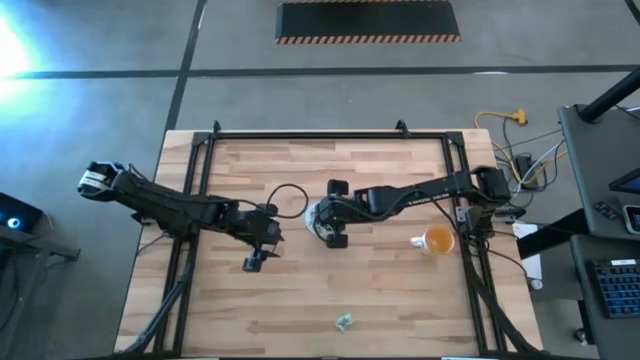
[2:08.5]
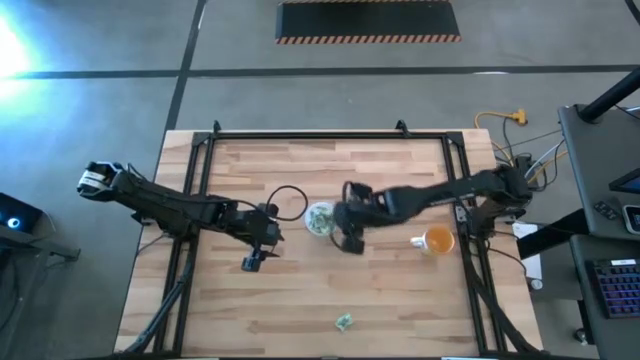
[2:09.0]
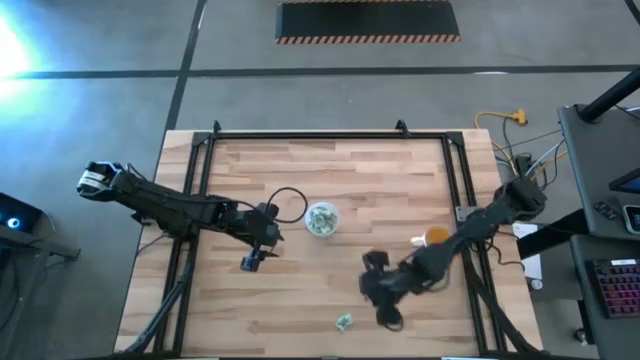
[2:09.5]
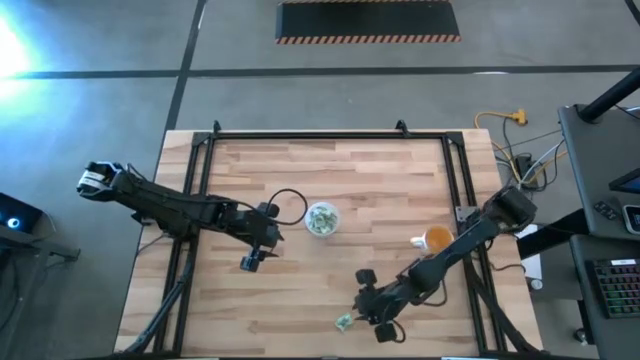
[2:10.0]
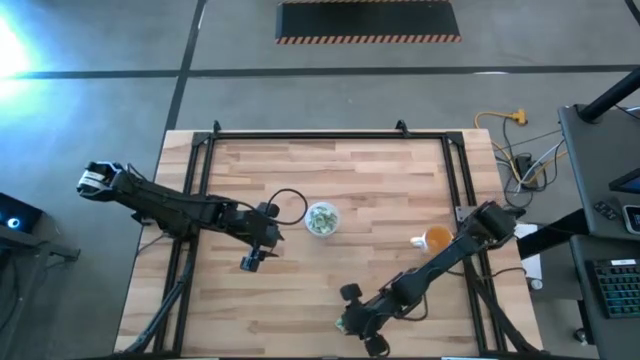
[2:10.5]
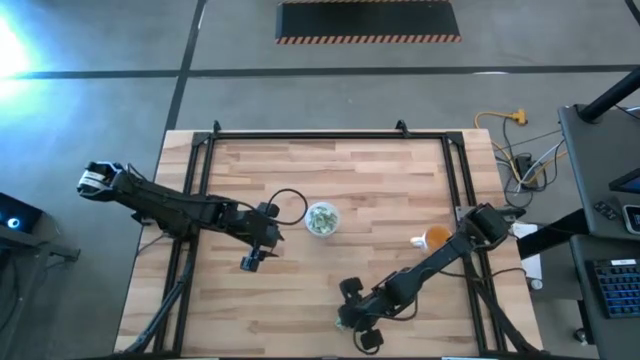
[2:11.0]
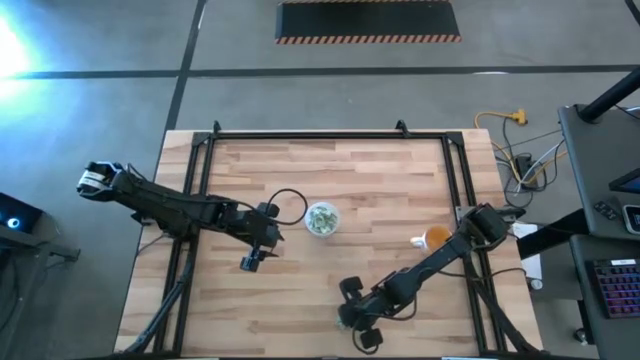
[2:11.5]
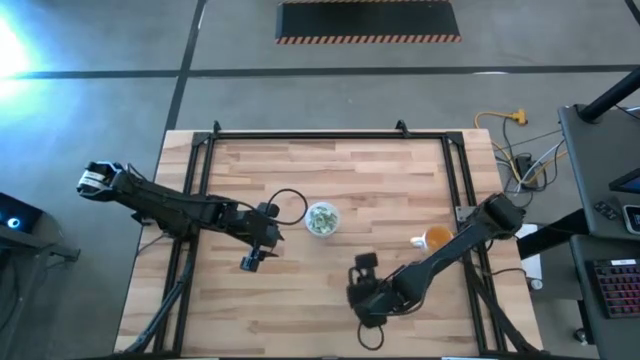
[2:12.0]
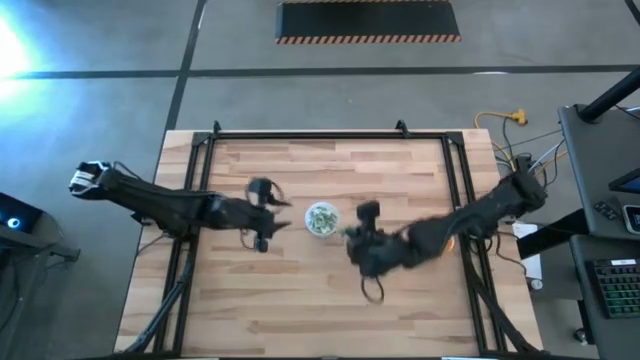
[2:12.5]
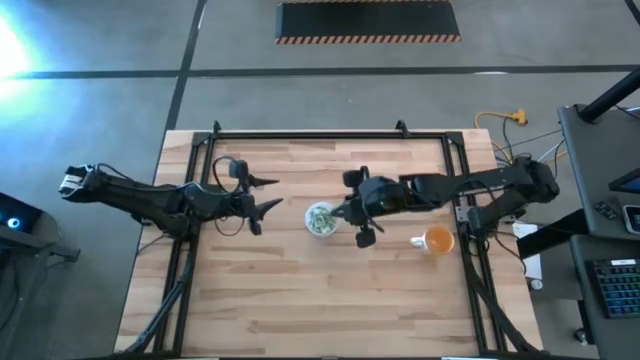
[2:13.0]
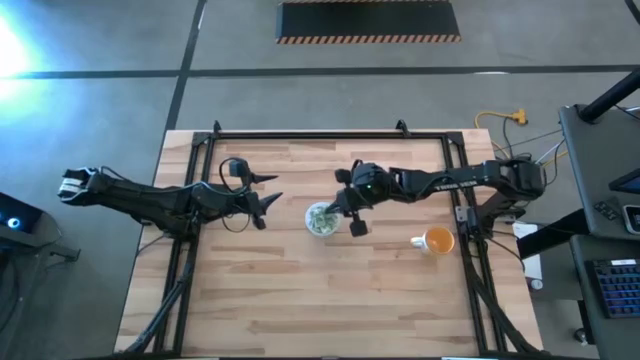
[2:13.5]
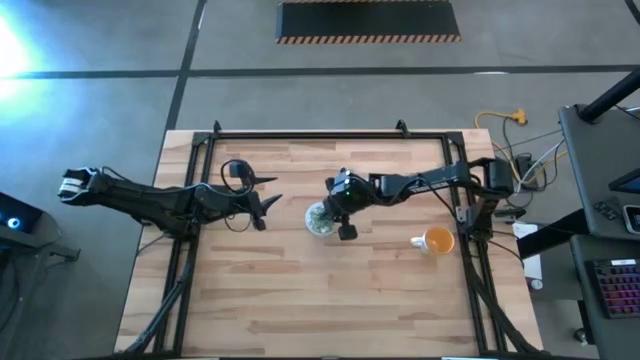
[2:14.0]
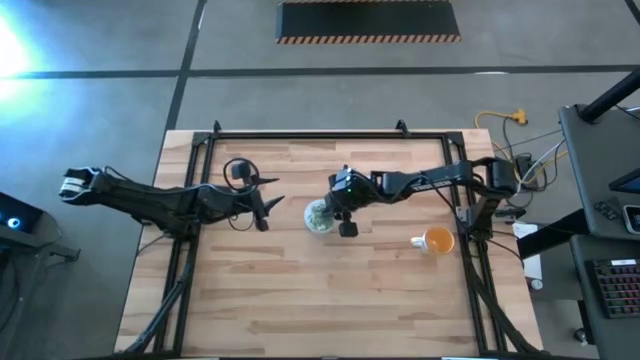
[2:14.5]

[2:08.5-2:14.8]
Task: Pick and place Stevia / Truvia into bins
Put the light green stevia packet into the transparent container

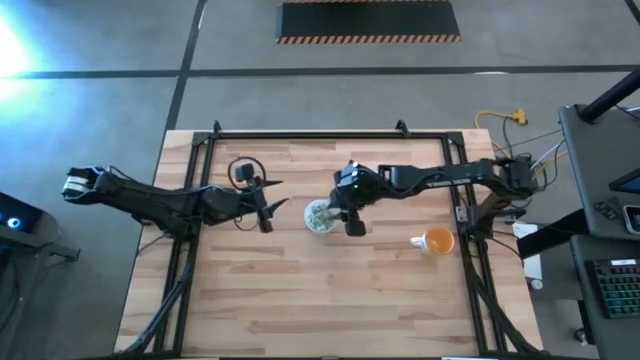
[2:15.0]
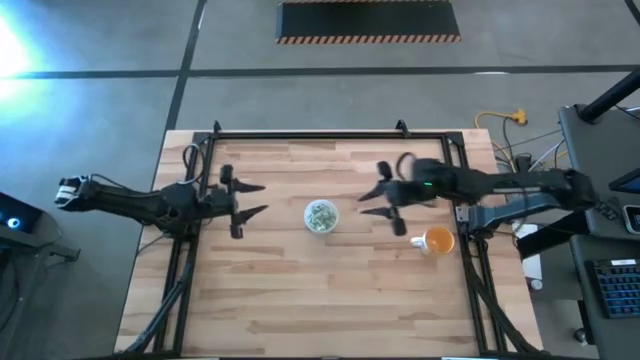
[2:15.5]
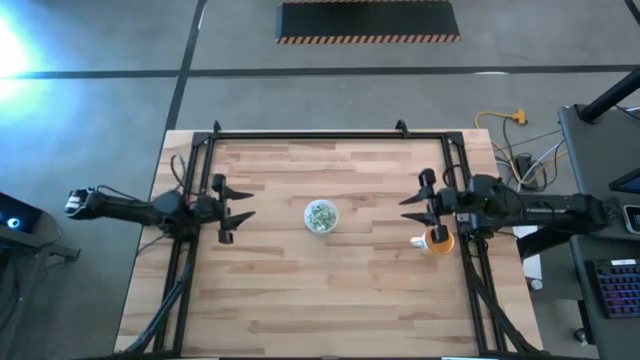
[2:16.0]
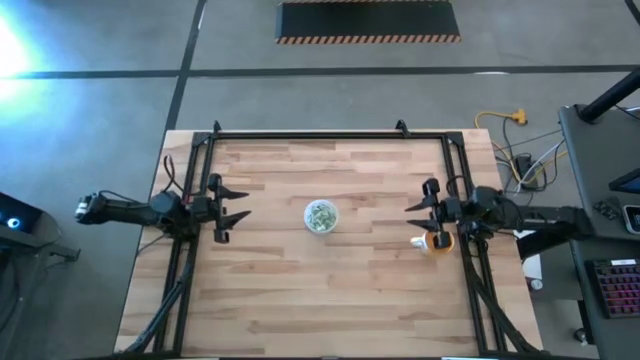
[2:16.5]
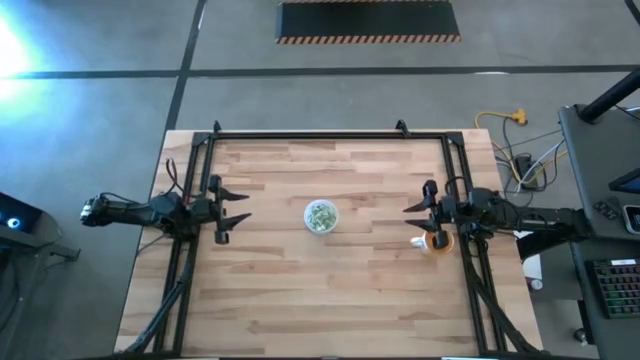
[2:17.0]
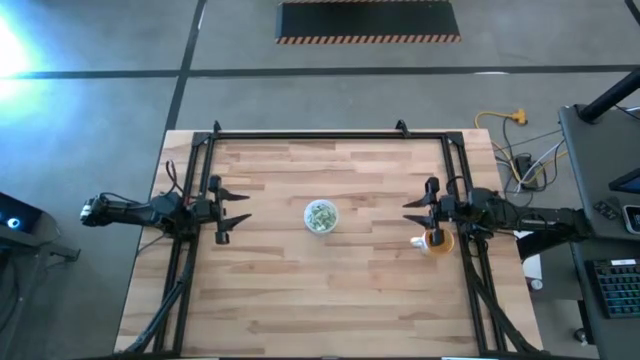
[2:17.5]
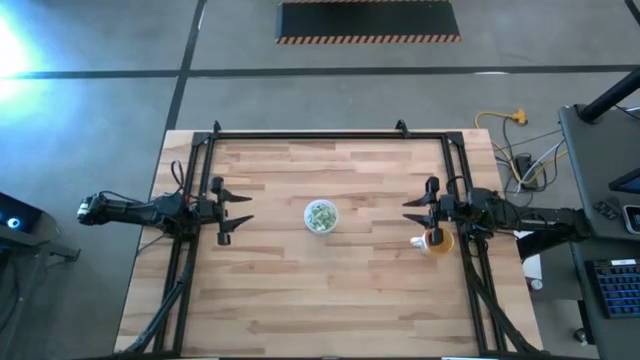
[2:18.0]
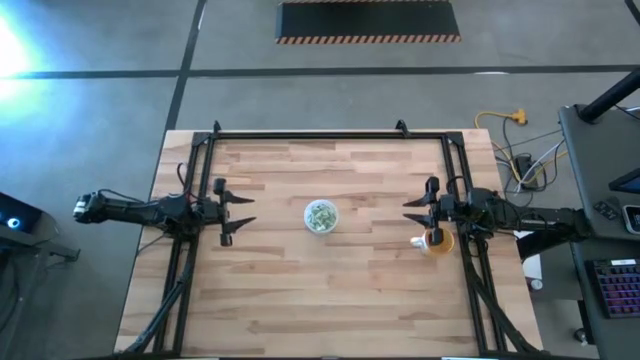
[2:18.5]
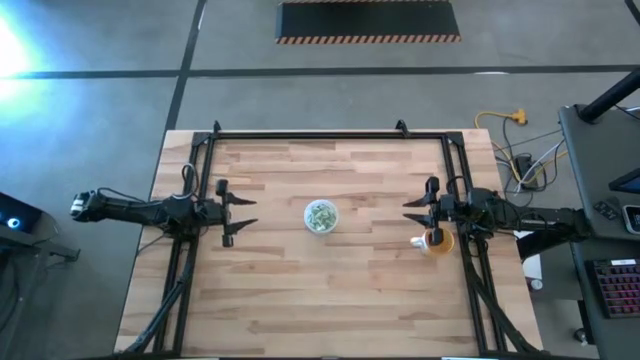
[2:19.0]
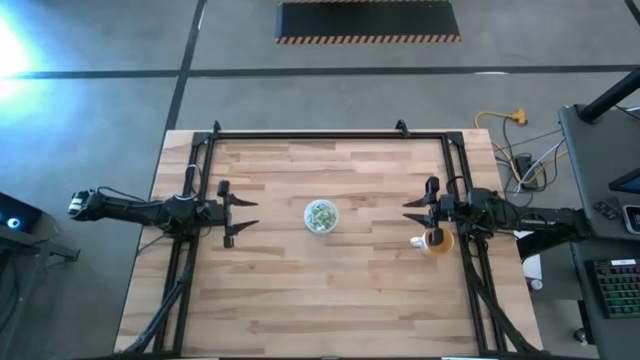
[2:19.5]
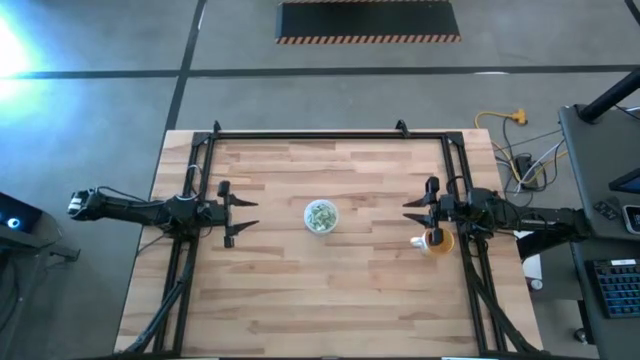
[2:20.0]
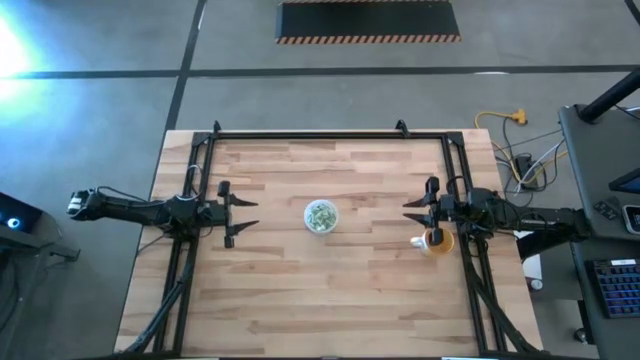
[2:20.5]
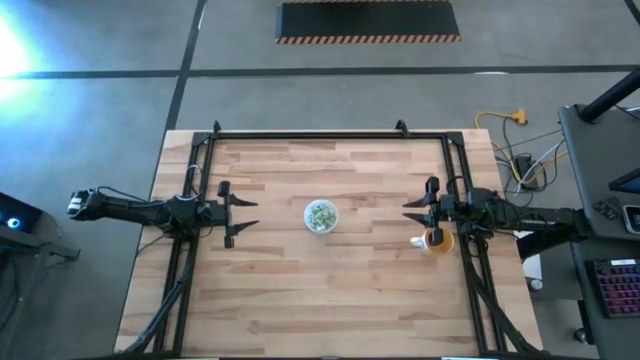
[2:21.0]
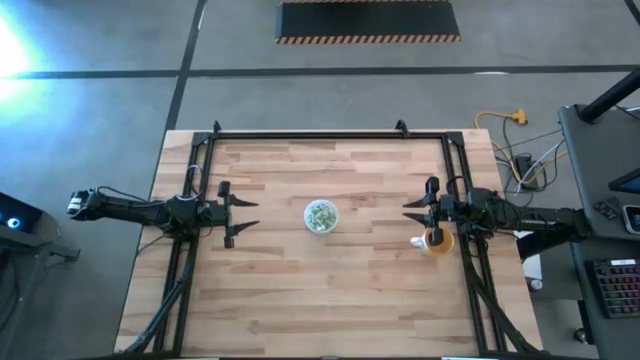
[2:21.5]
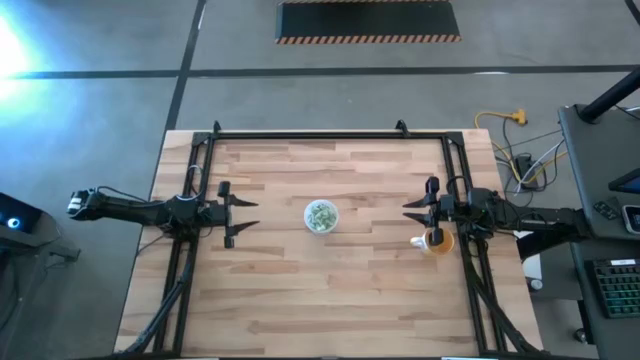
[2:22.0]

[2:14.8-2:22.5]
Return to Home Position

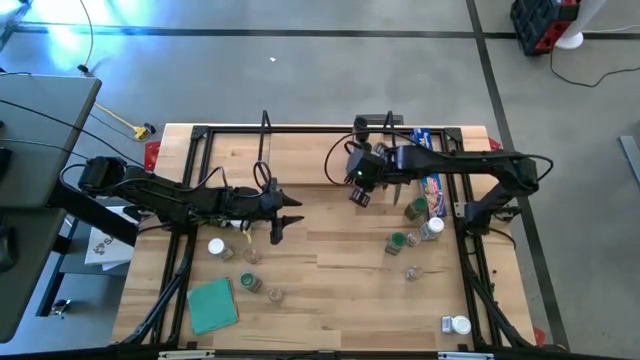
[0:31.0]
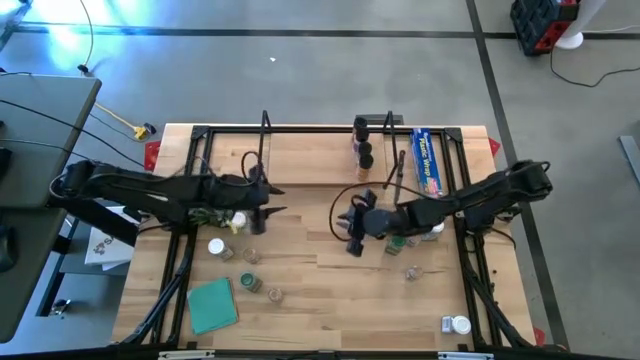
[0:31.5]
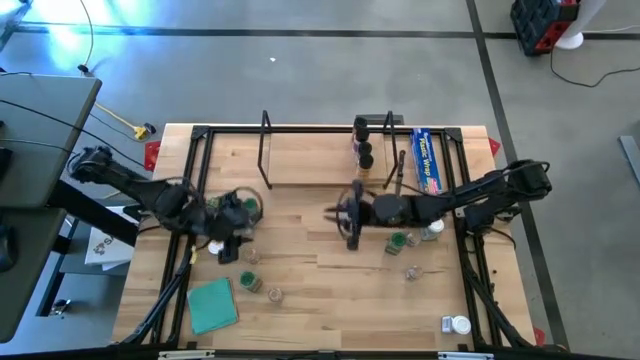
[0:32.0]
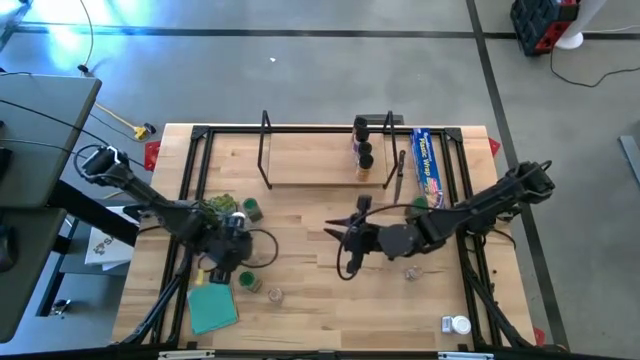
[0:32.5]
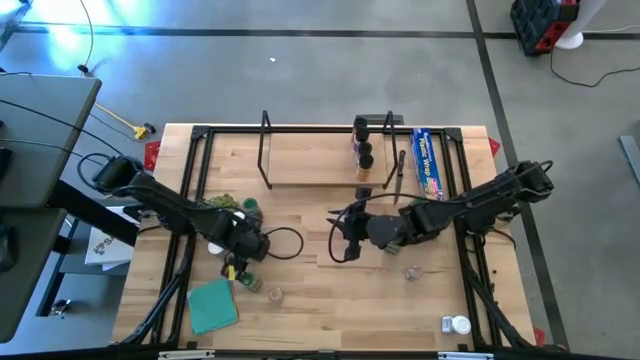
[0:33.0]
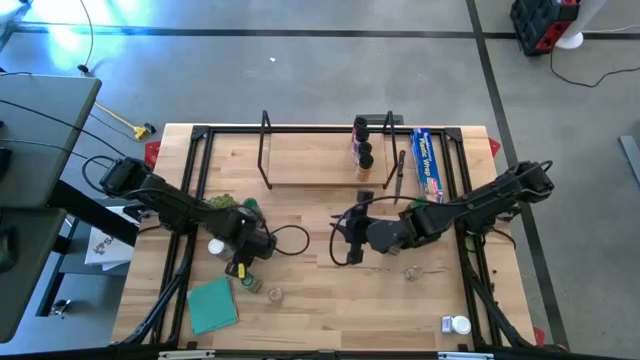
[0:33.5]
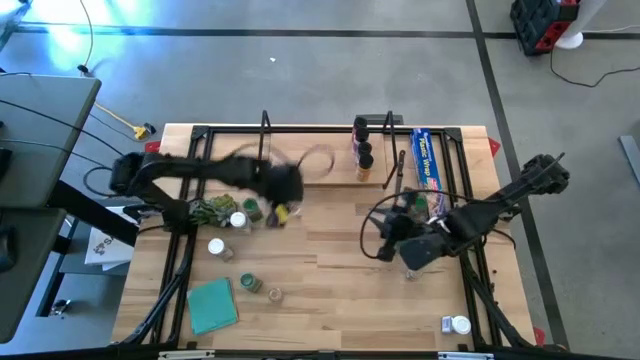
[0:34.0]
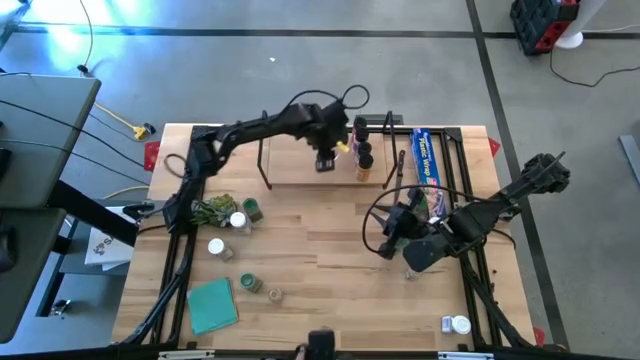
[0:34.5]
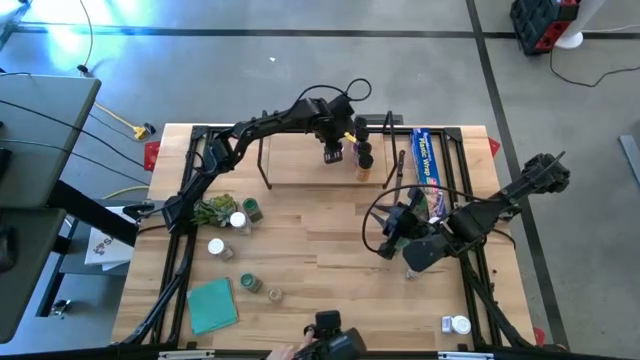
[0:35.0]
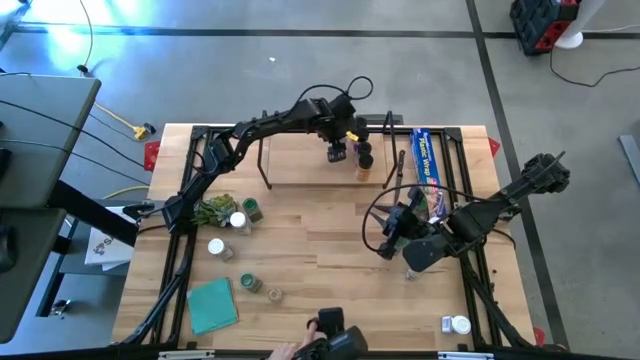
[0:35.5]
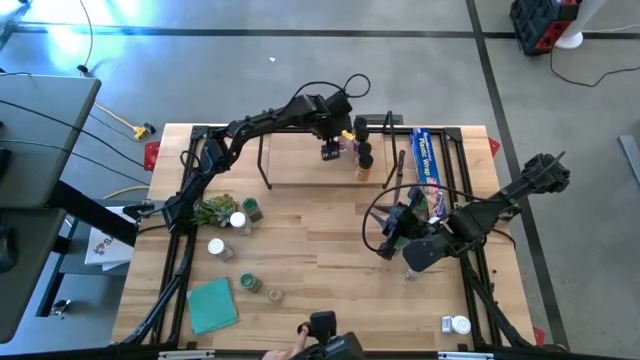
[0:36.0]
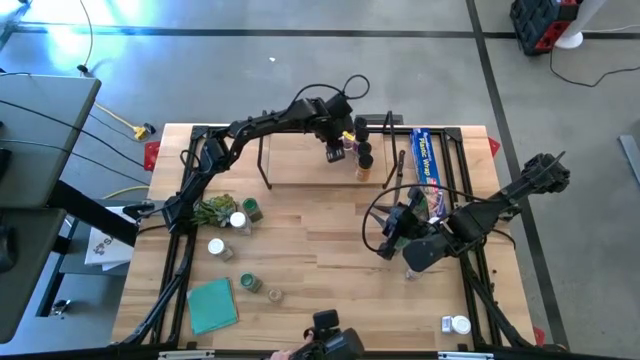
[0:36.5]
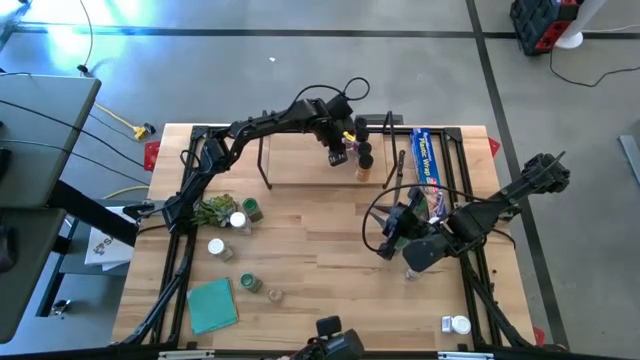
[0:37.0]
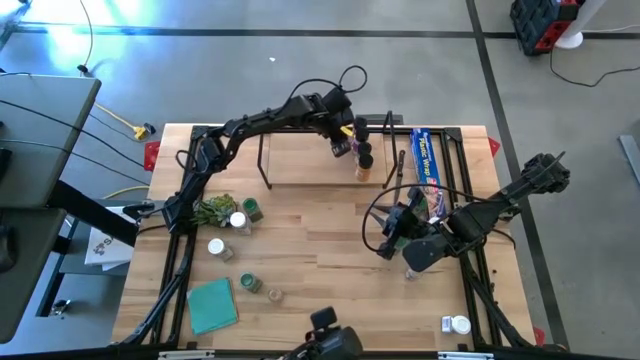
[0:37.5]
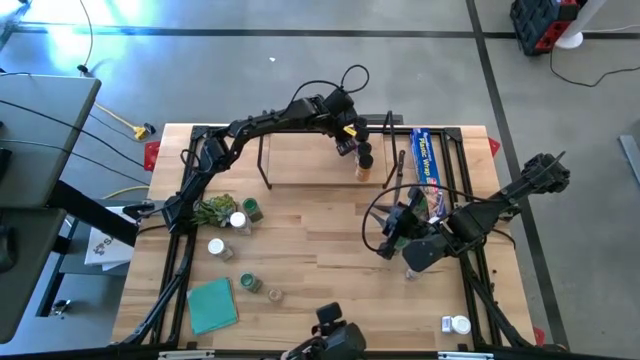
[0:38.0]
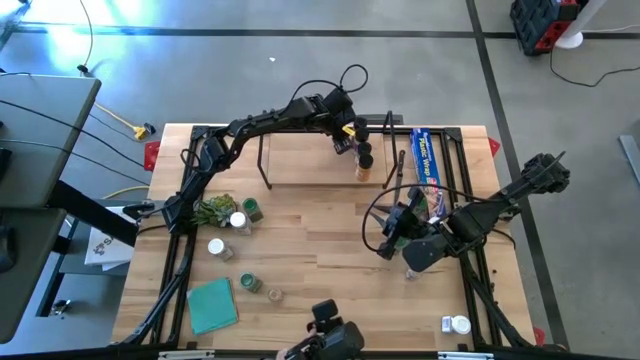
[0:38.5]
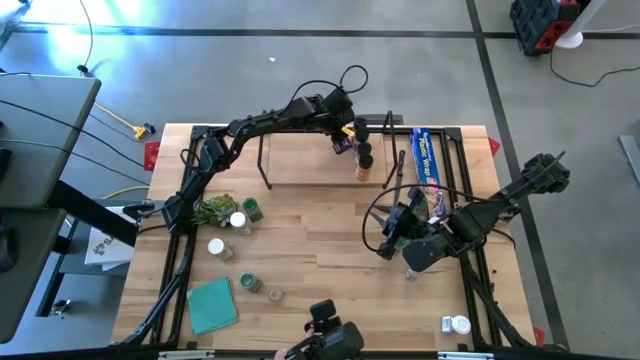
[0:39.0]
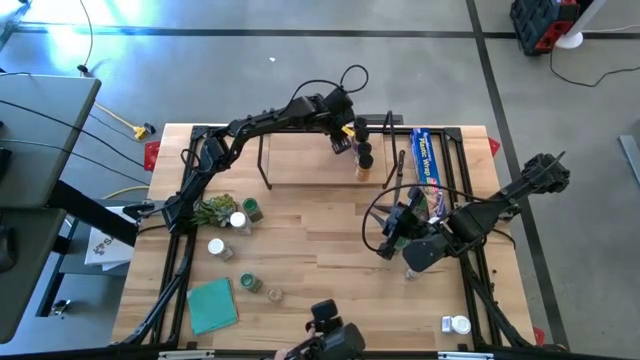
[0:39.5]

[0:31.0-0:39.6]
Task: Shelf spices
Put the brown seasoning bottle on the shelf
